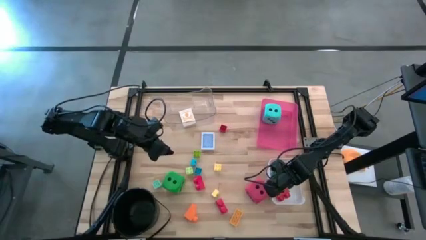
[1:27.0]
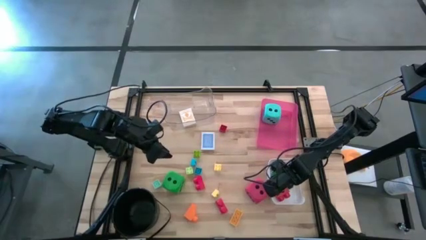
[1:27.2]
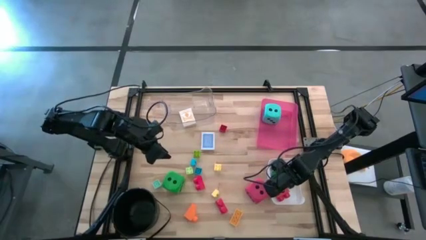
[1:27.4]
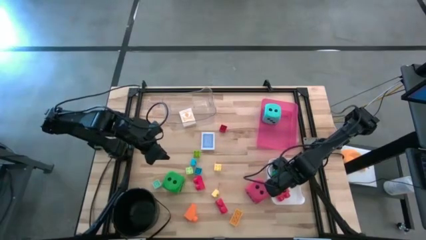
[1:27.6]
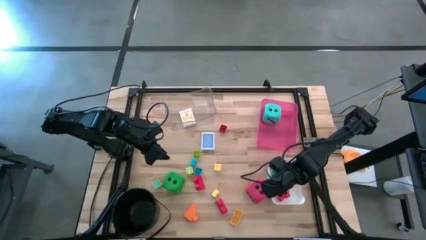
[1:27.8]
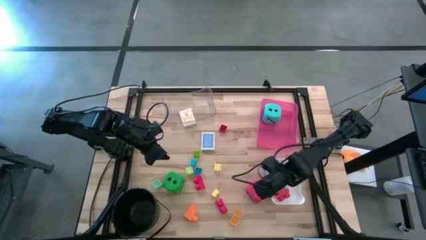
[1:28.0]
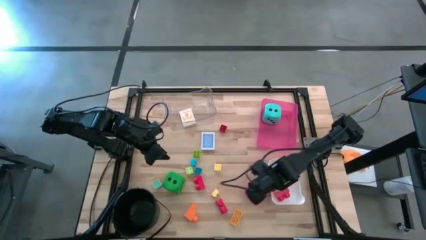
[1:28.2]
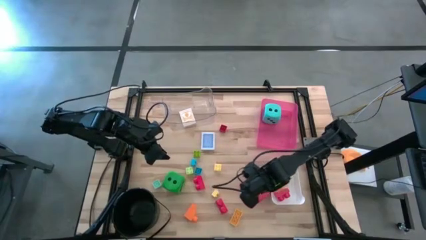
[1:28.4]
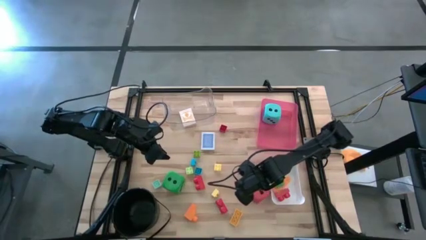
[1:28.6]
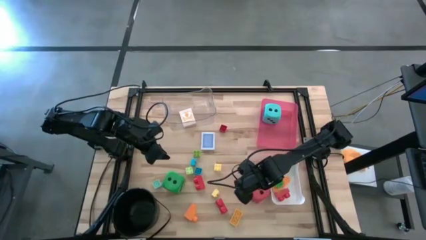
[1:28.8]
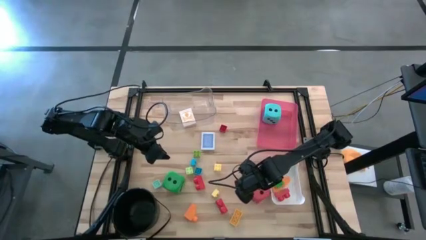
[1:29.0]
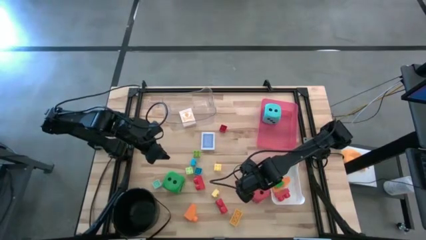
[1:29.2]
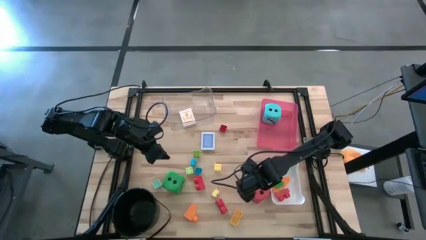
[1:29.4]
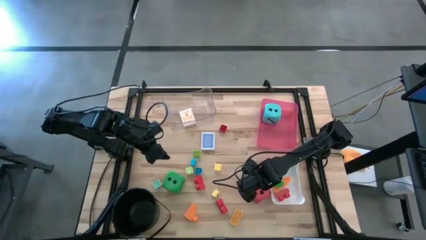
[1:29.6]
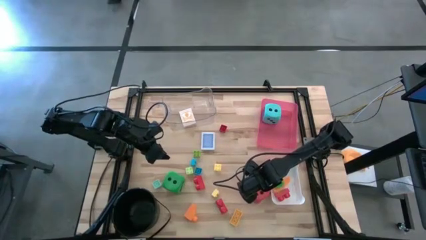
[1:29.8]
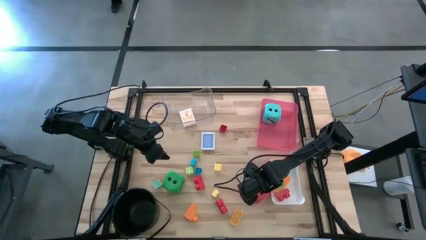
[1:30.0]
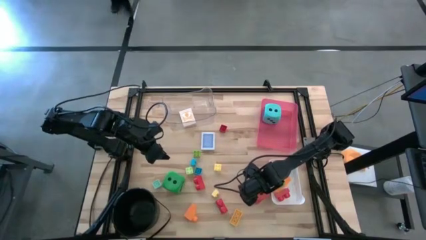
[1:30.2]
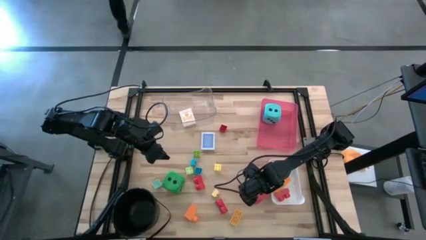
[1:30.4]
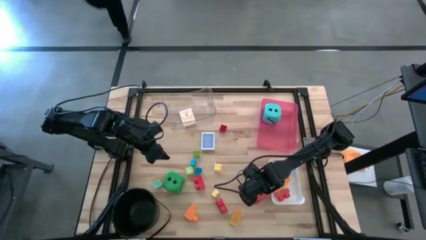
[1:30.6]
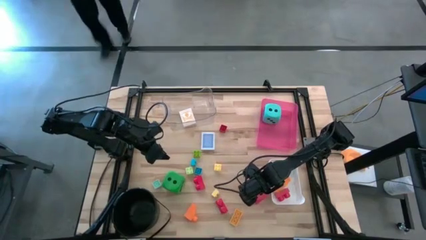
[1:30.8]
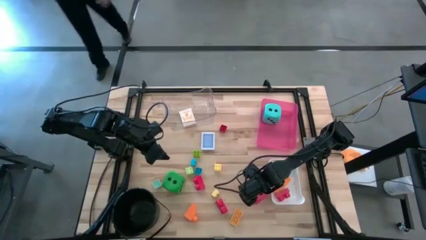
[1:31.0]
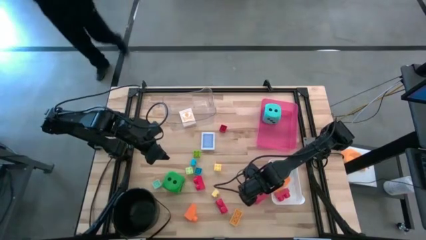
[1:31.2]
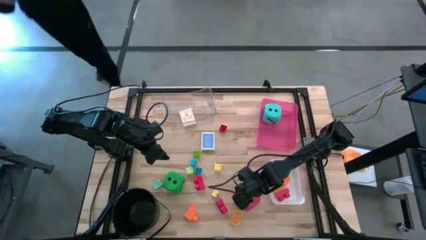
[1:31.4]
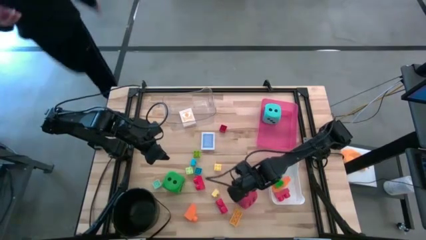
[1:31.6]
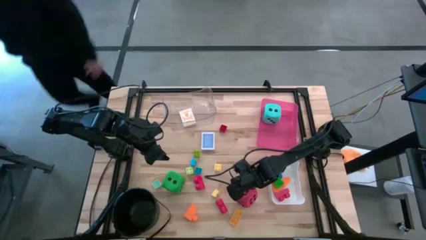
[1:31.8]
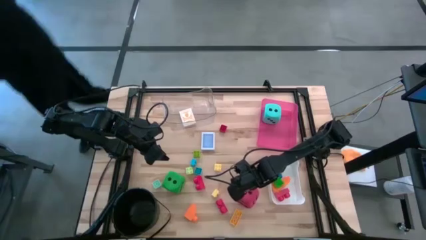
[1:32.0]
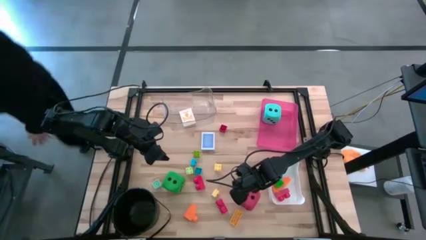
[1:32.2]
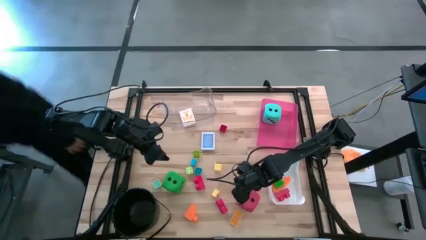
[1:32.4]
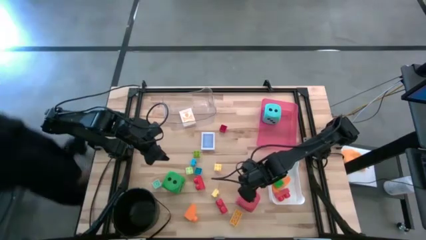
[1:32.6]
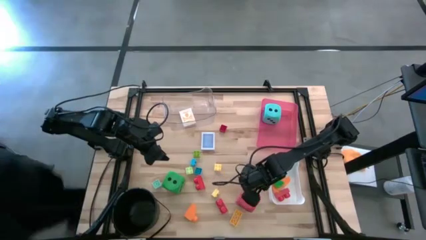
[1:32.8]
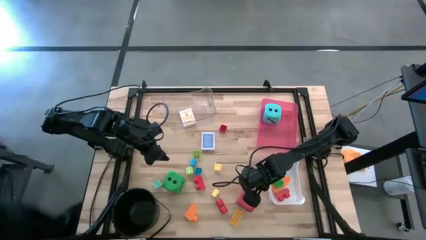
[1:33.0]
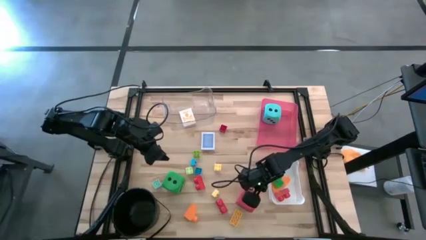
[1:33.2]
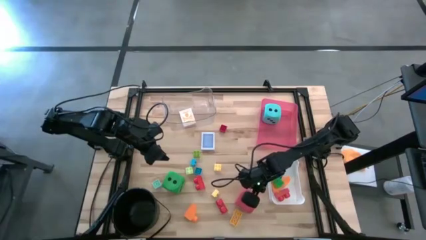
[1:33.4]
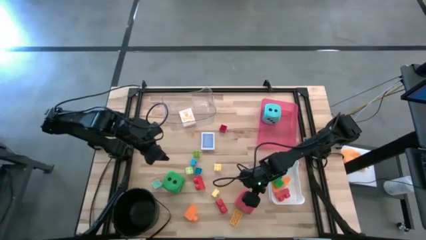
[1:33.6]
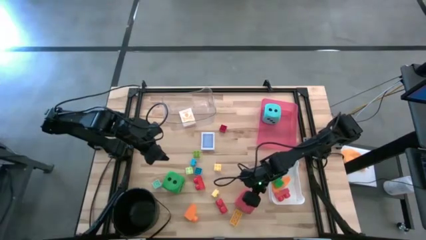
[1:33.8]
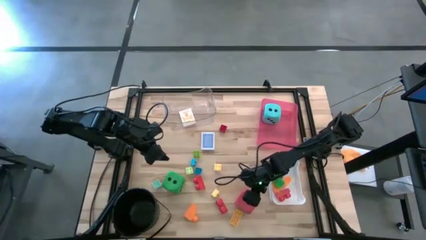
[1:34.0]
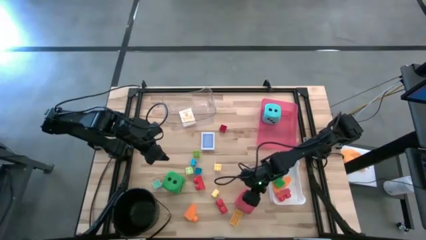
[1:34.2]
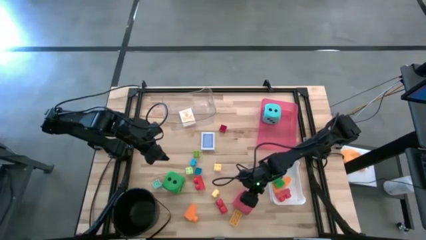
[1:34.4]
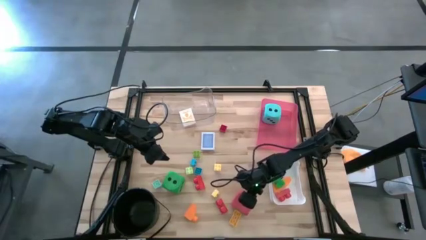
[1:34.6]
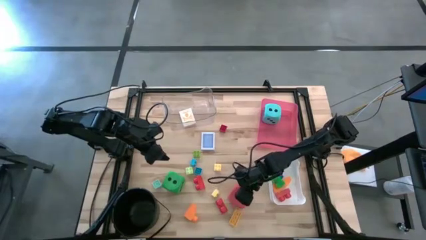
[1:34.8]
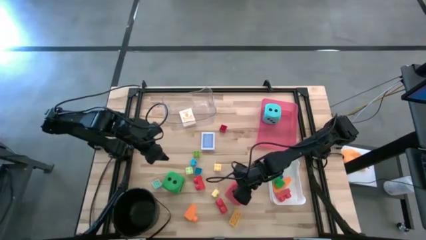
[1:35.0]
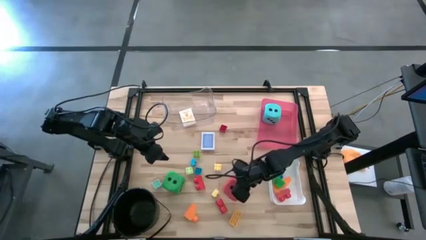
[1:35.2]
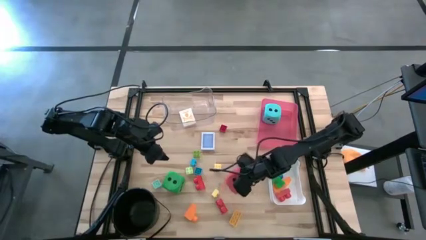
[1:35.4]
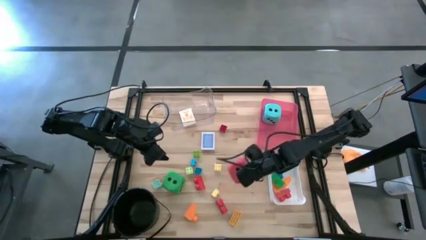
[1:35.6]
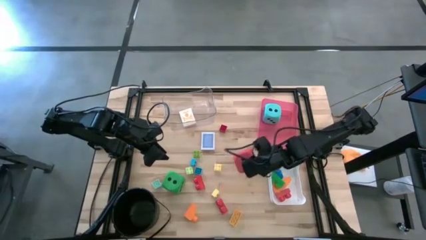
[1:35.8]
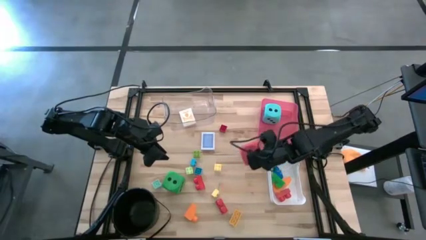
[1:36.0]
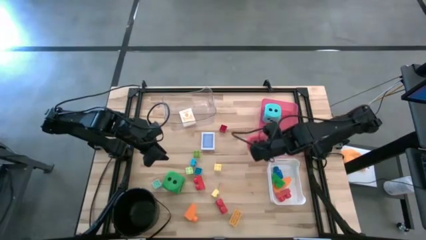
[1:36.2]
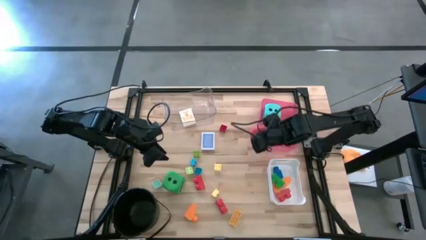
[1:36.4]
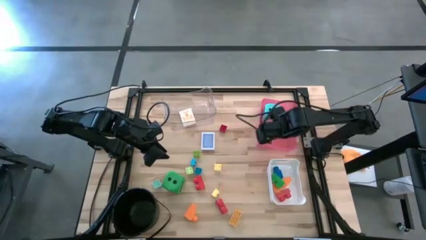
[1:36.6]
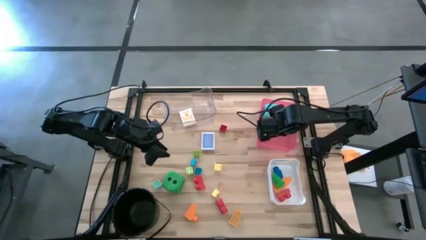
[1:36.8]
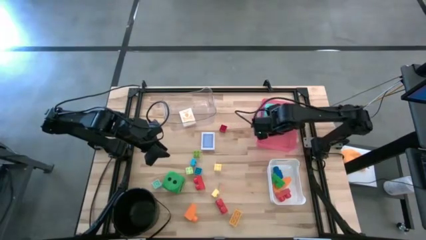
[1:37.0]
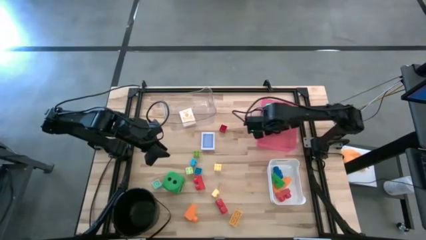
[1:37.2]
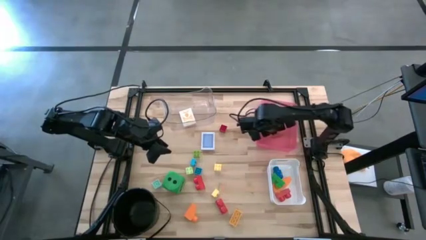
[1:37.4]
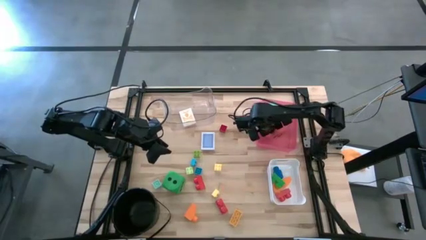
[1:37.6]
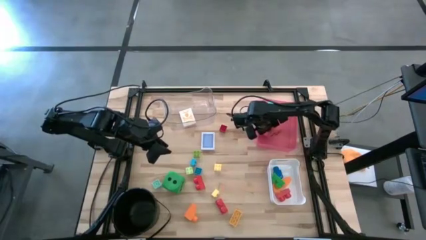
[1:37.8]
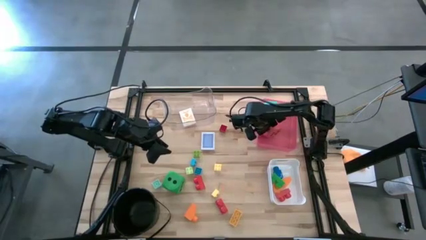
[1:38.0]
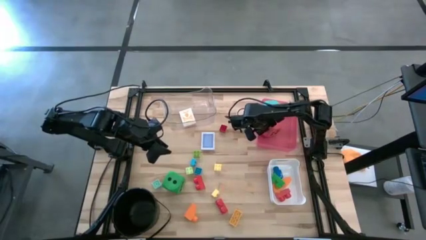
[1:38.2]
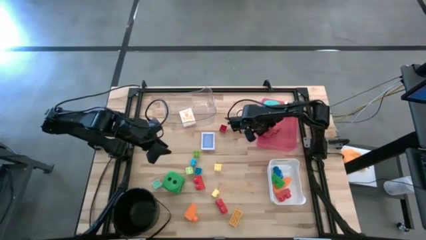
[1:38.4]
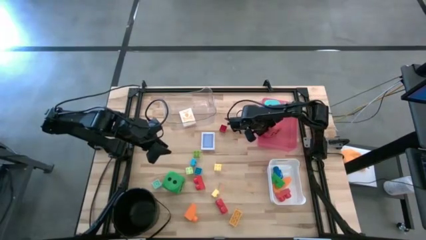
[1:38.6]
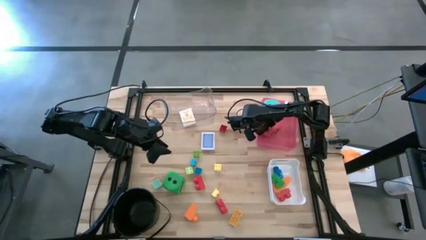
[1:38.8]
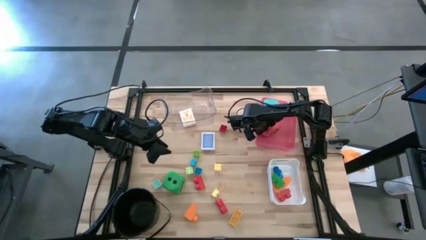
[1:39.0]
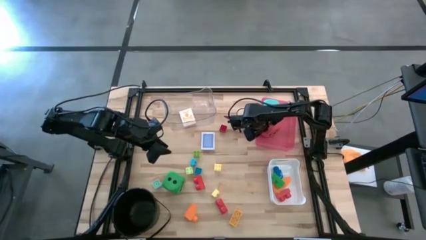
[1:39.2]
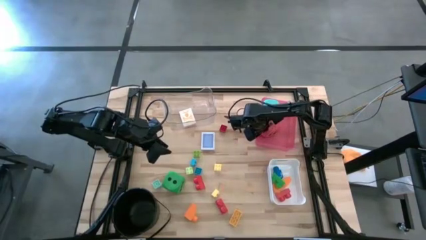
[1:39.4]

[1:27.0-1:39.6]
Task: Pick & Place Toys
Put the red dice into the red bin
